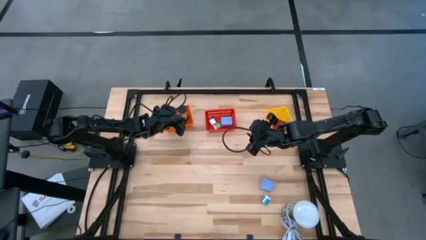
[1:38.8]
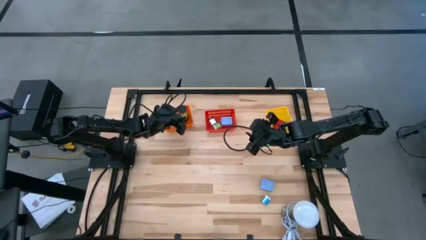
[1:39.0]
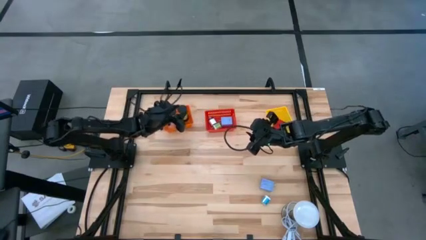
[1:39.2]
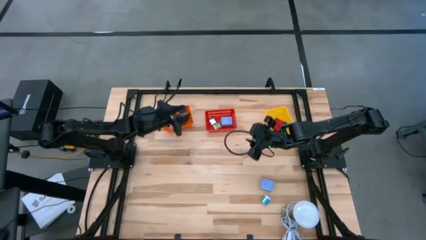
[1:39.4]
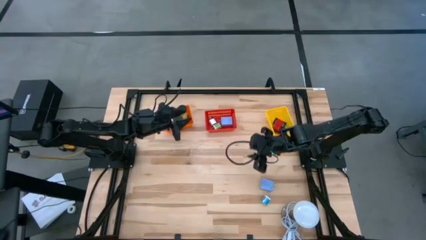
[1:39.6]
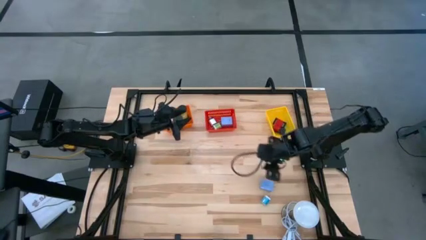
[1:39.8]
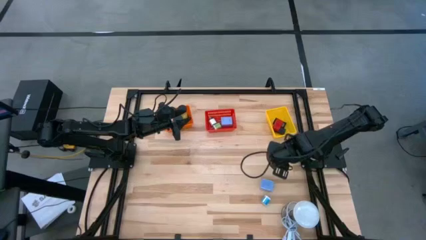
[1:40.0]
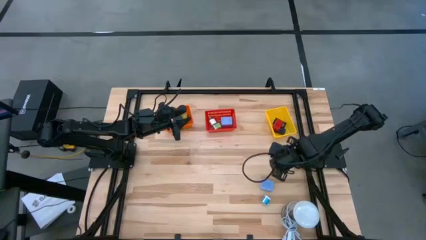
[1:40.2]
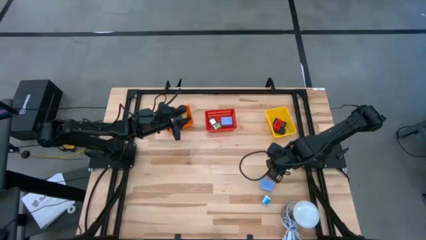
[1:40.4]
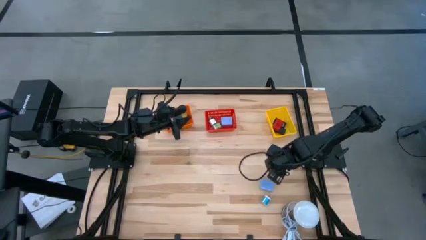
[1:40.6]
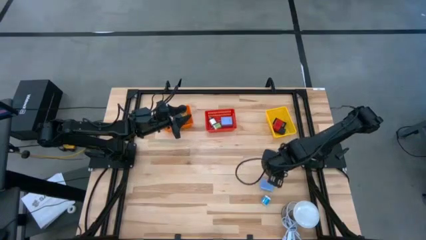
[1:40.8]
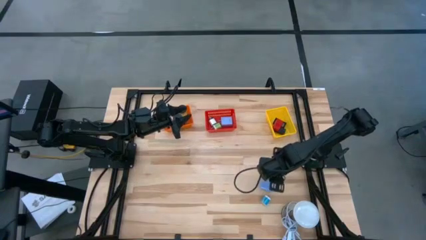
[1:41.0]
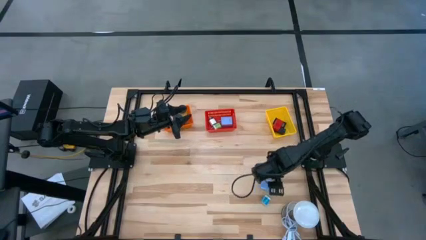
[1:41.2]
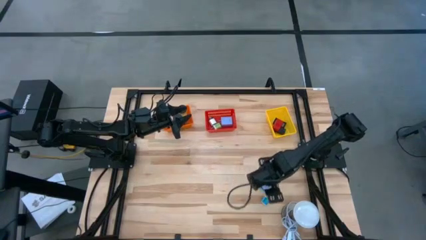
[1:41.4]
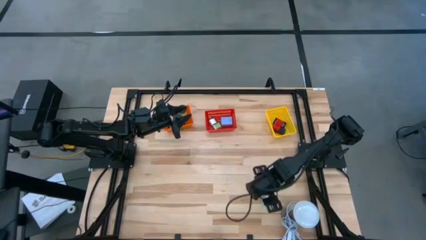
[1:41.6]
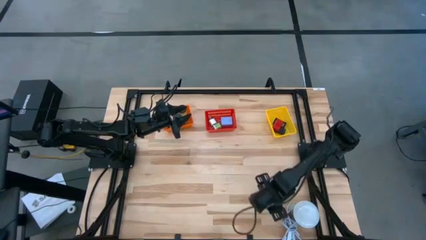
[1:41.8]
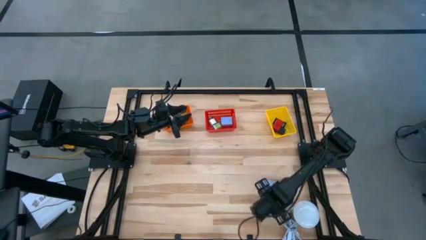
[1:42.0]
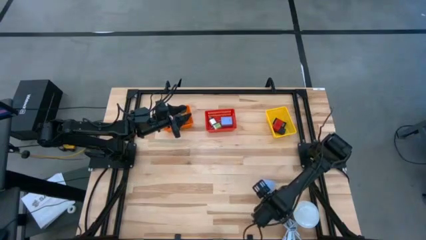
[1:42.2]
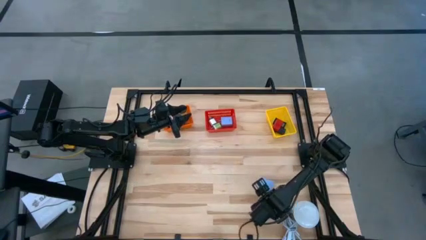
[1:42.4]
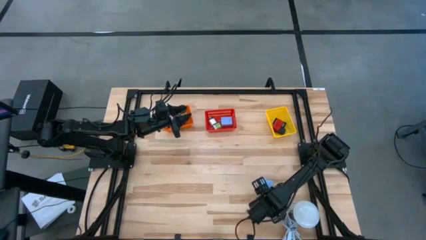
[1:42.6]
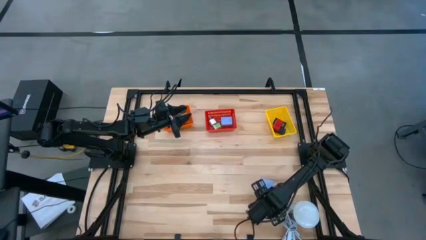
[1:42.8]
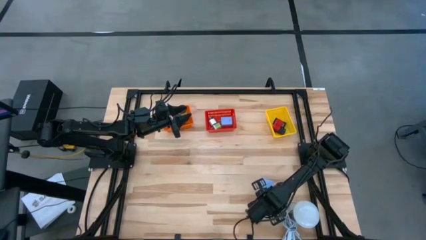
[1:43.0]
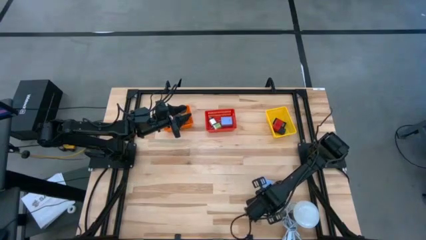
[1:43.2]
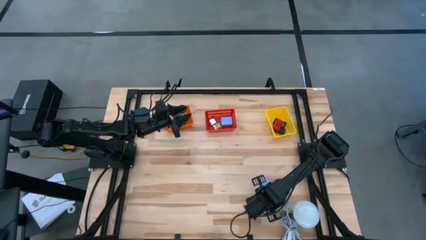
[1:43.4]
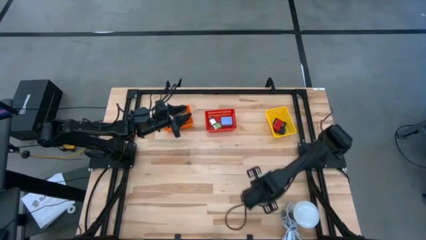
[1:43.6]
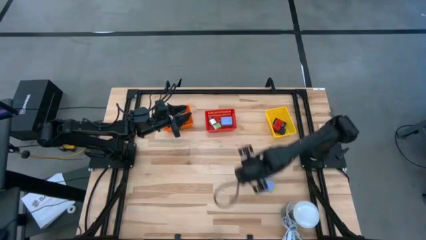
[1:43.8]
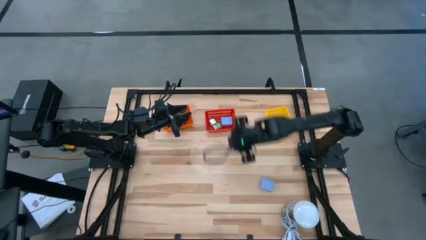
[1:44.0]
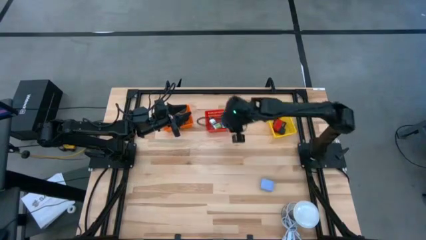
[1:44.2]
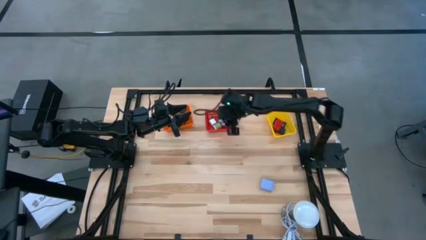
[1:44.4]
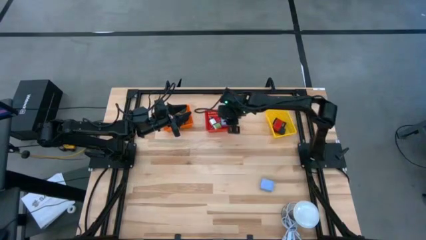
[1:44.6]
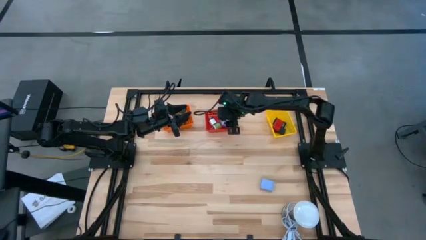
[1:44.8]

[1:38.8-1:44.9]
Task: Pick & Place Office items
Put the blue charger adapter into the red bin

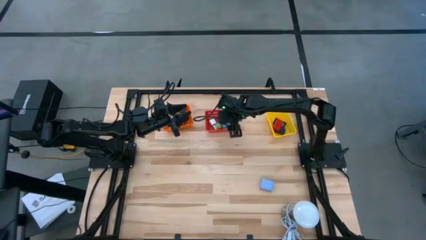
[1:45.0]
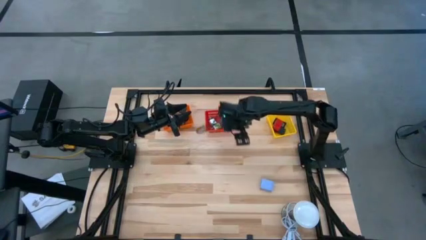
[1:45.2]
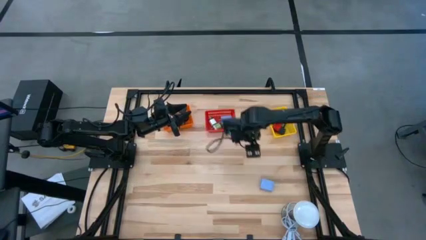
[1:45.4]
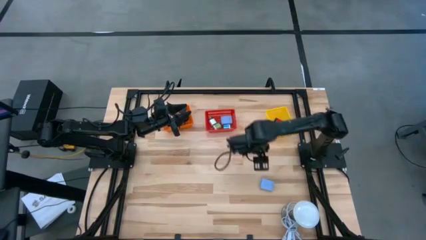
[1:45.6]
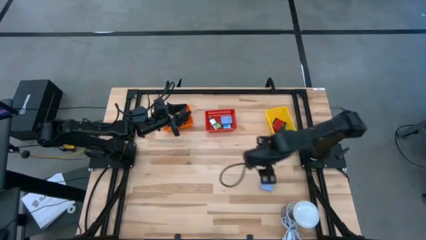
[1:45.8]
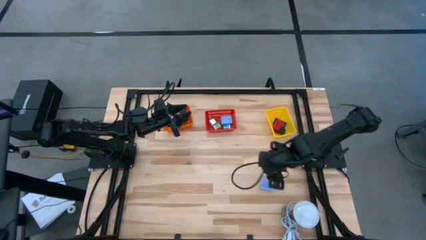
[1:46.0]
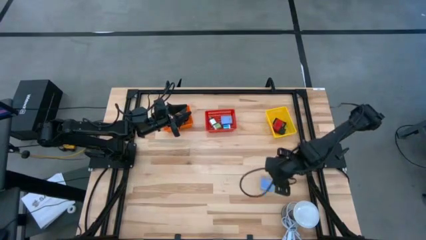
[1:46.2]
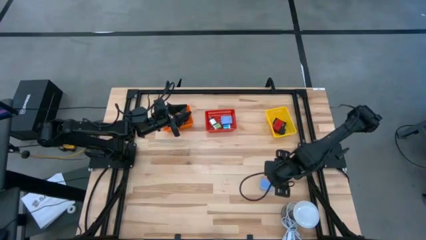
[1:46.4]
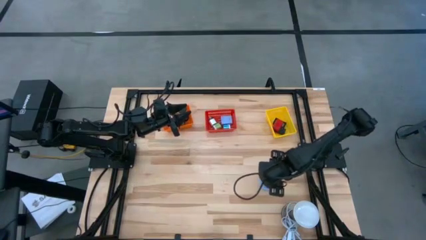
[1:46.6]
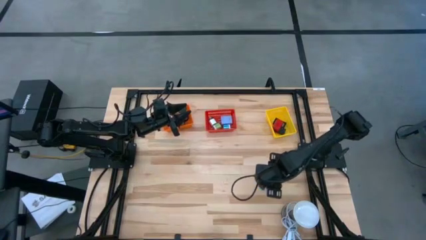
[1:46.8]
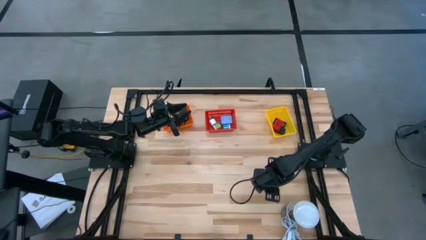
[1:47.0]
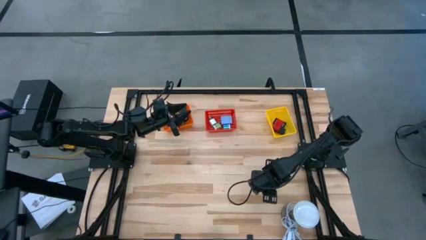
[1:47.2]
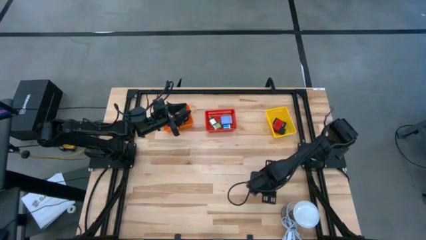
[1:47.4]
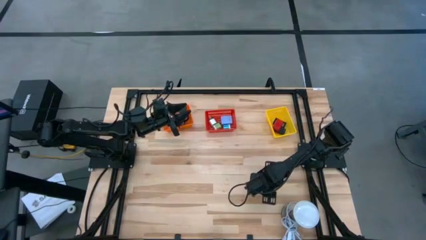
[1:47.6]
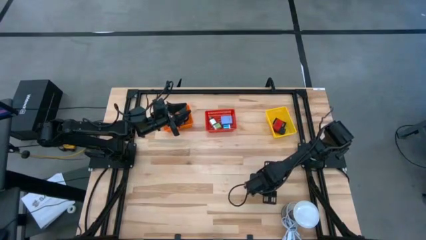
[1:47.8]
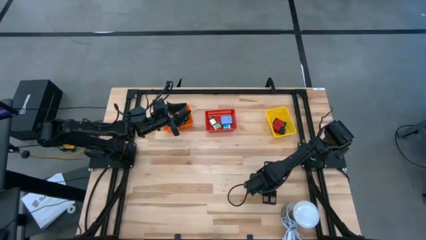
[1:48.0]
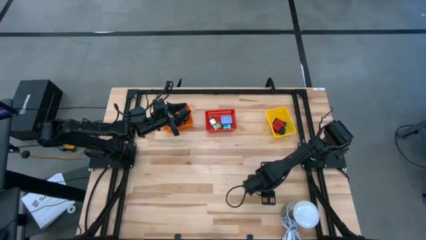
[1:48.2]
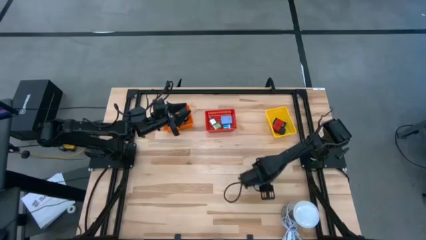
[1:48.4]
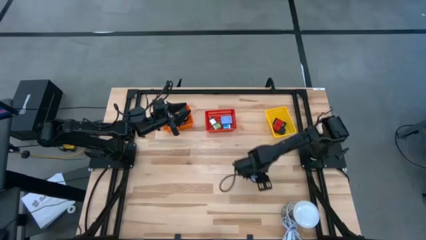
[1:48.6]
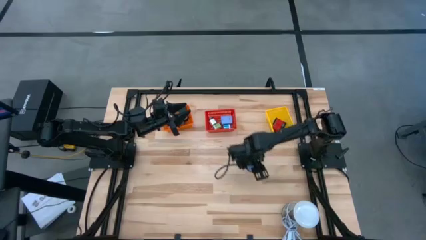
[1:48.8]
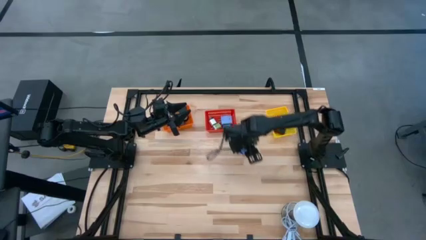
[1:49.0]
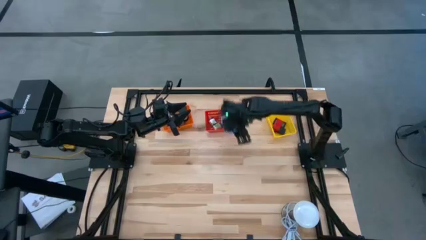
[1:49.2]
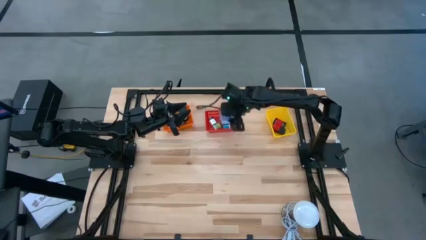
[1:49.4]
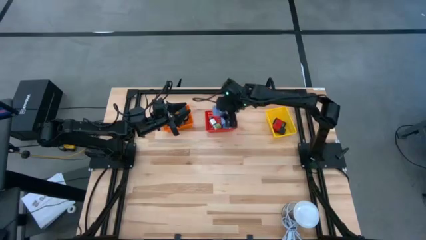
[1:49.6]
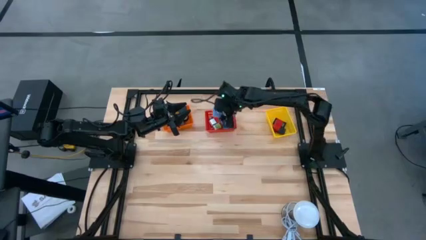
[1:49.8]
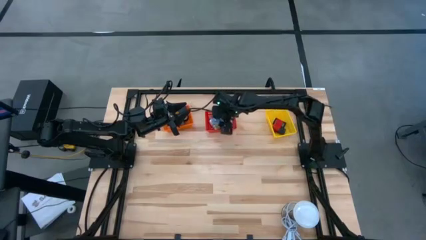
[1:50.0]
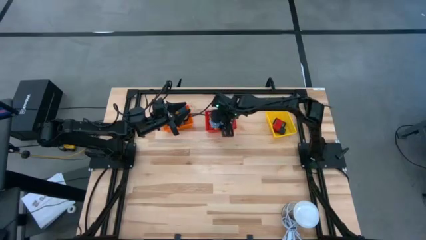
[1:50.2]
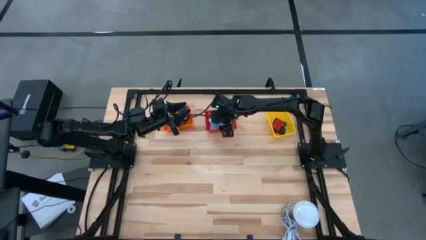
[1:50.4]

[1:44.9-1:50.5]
Put the light violet charger adapter into the red bin

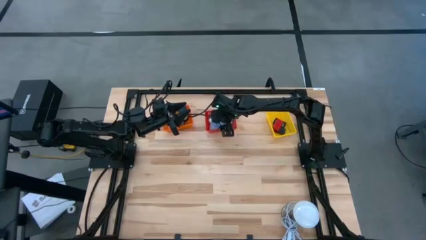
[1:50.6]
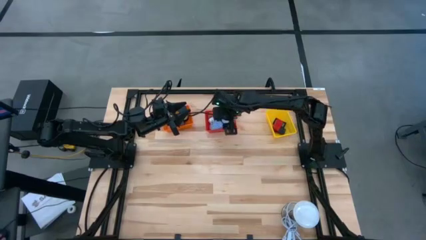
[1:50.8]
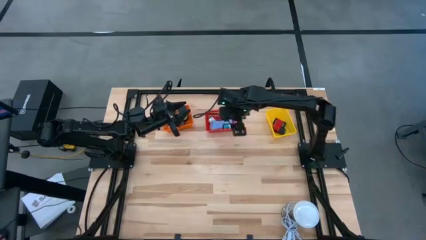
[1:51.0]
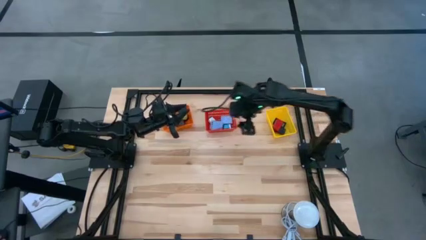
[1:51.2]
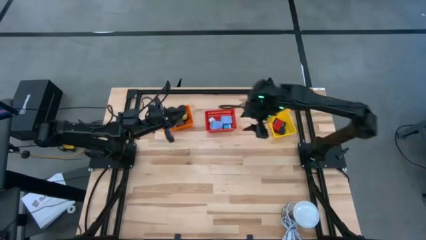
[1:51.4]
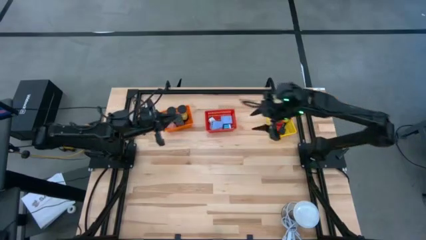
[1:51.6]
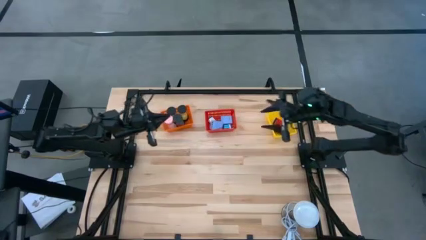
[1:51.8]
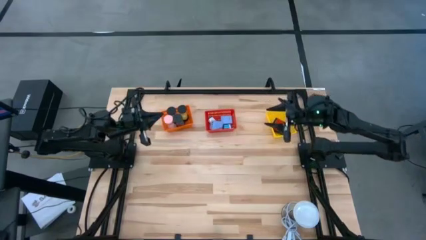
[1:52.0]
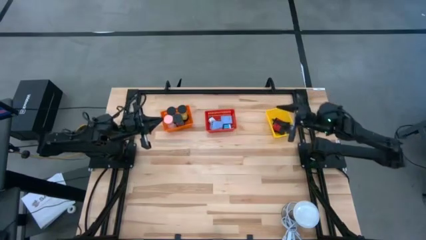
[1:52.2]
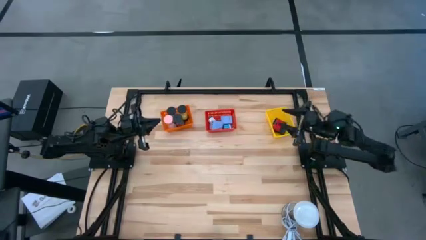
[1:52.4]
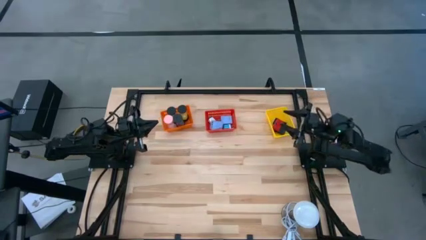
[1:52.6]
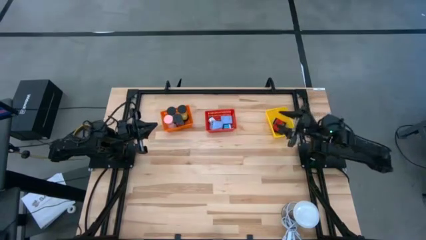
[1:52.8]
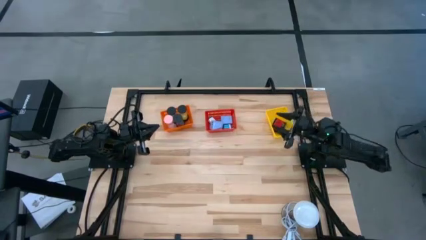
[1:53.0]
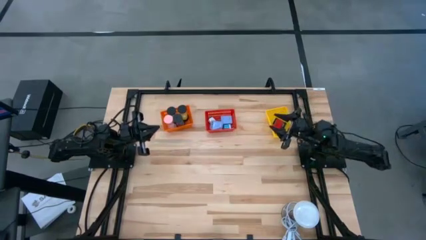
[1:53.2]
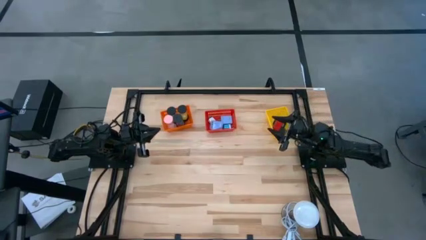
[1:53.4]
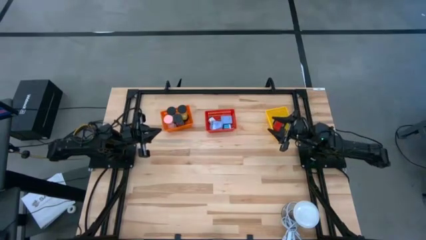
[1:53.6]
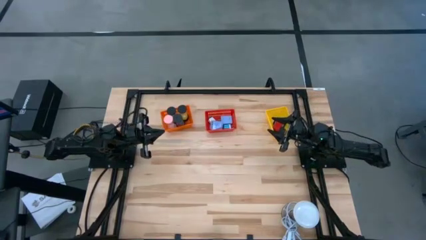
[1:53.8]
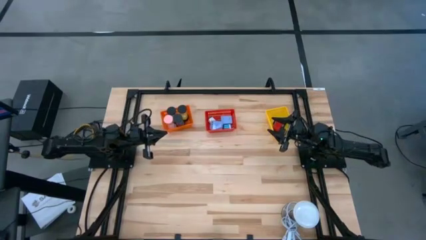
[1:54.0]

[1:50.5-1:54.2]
Return to Home Position

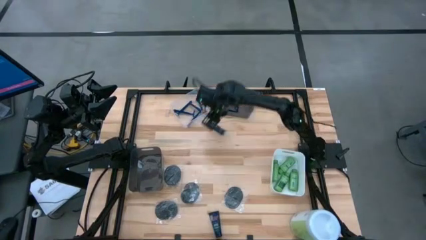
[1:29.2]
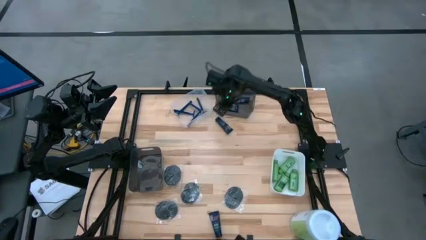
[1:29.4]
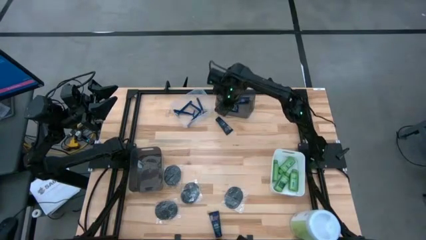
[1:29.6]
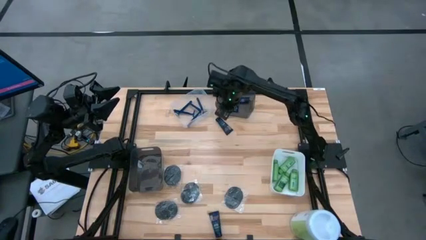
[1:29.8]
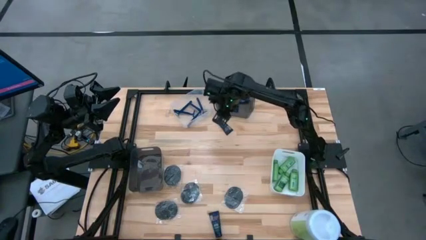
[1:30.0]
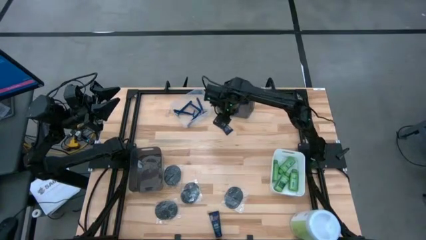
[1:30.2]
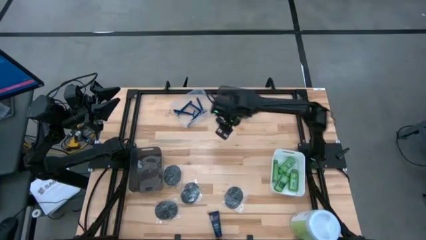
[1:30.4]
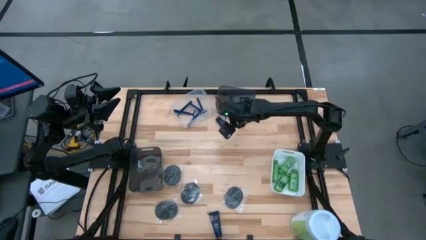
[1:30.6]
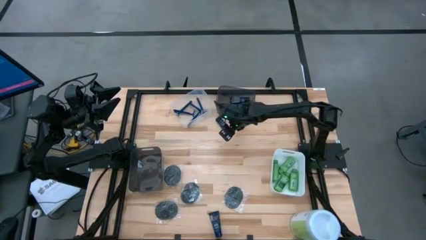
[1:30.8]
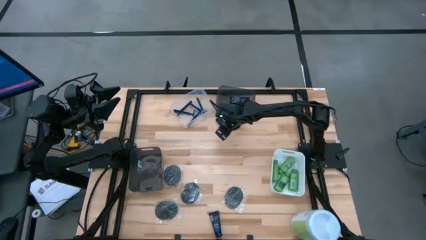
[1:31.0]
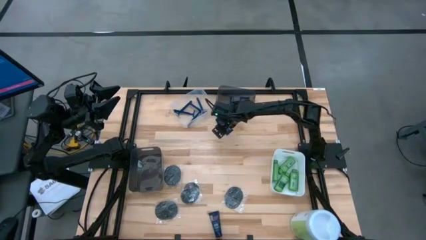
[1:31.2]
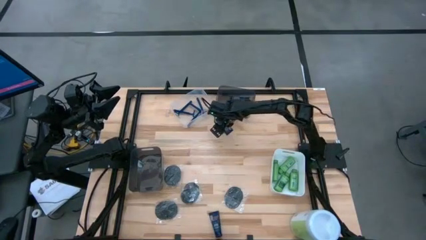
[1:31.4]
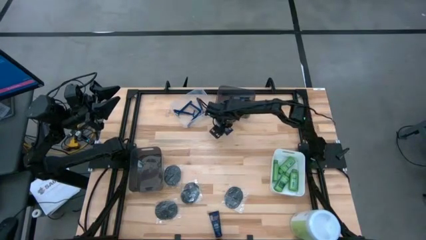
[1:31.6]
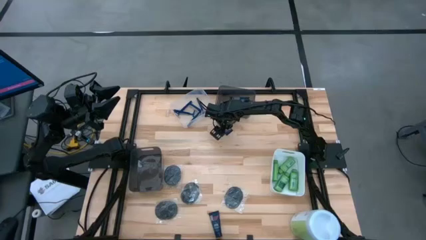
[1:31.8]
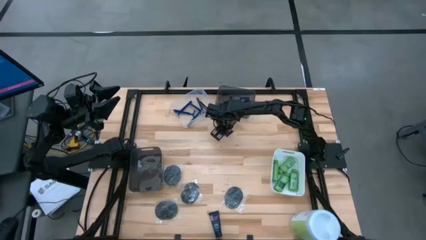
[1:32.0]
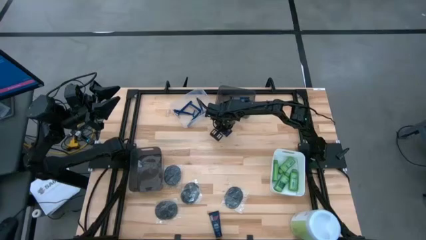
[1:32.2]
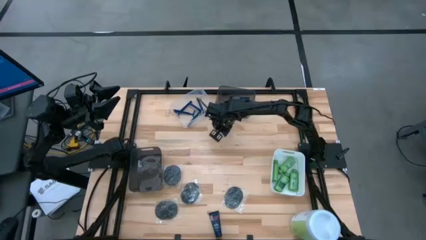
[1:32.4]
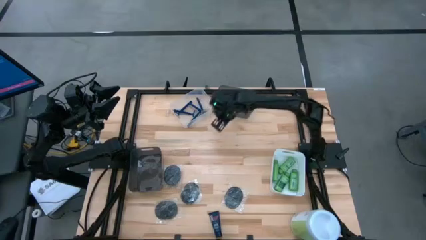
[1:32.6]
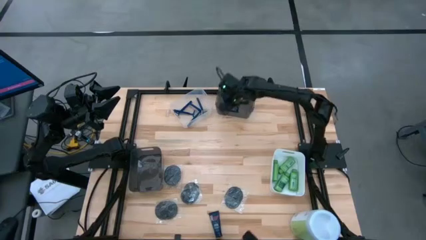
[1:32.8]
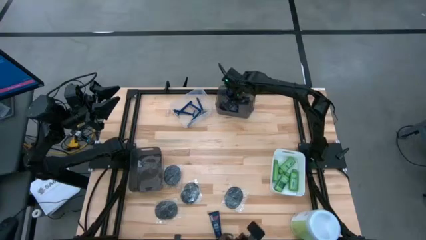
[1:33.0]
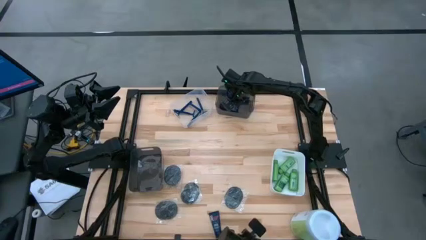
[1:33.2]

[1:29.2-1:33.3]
Task: Pick & Place Travel size toiletries
Put the blue shave cream into the top black bin
